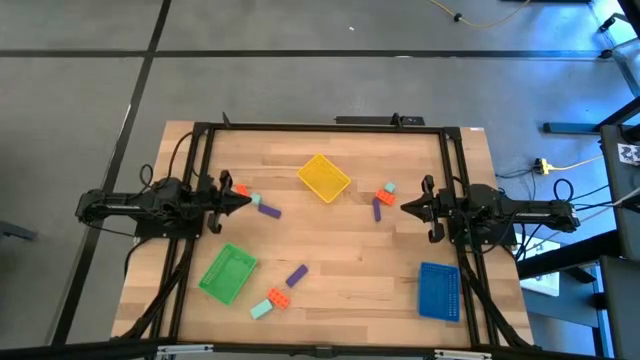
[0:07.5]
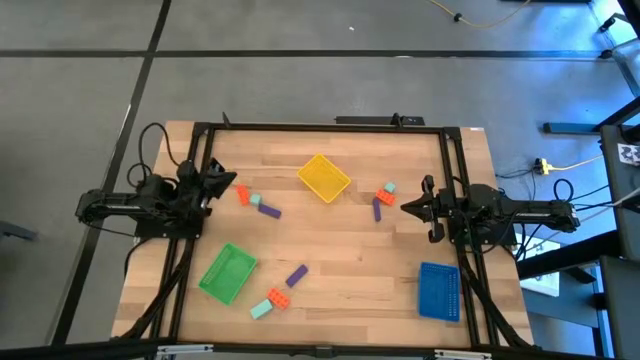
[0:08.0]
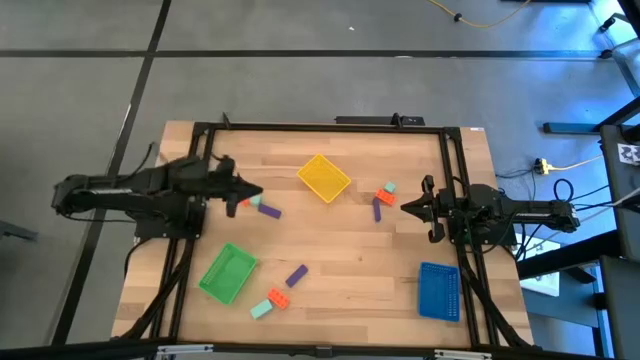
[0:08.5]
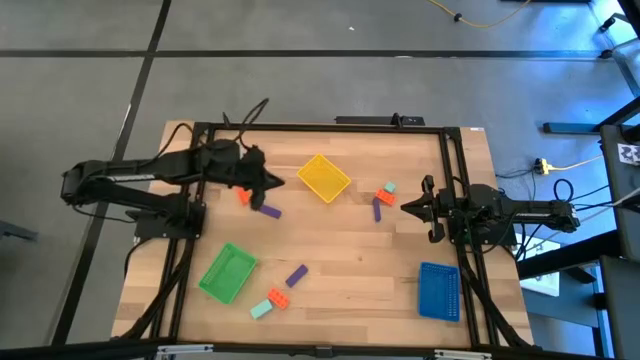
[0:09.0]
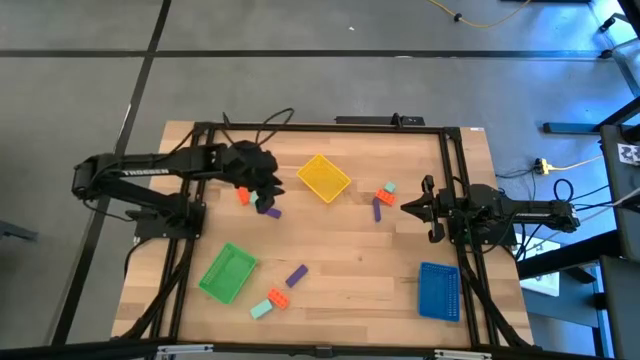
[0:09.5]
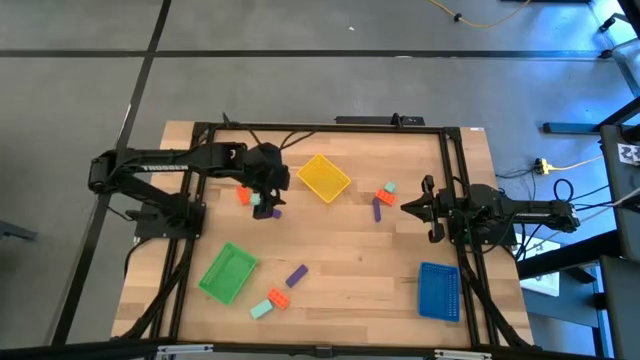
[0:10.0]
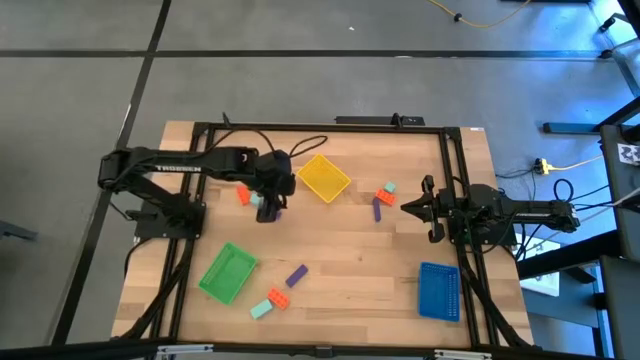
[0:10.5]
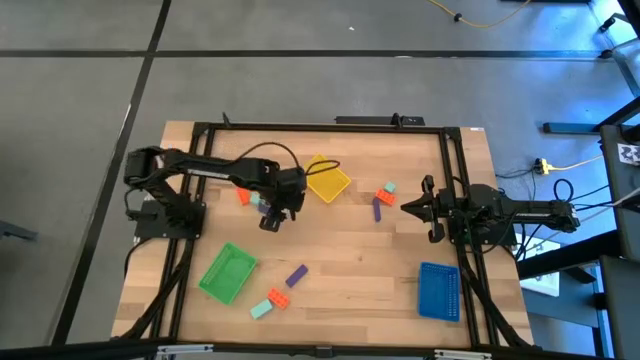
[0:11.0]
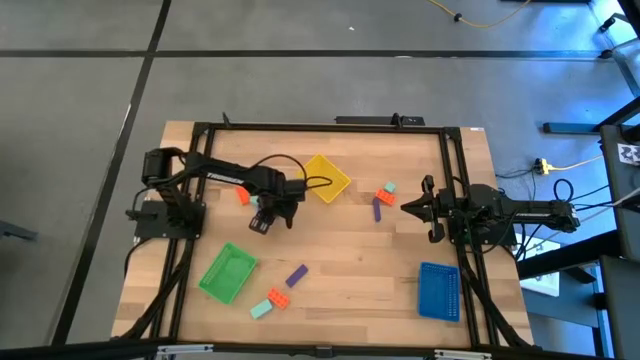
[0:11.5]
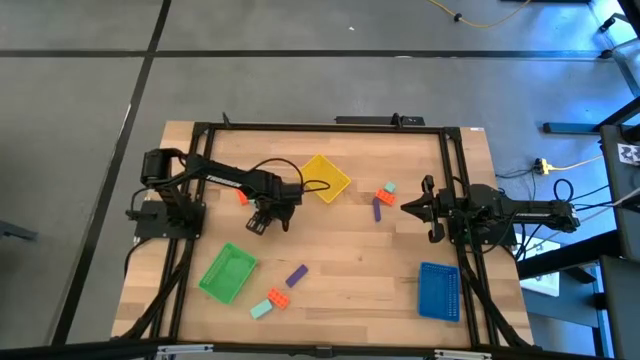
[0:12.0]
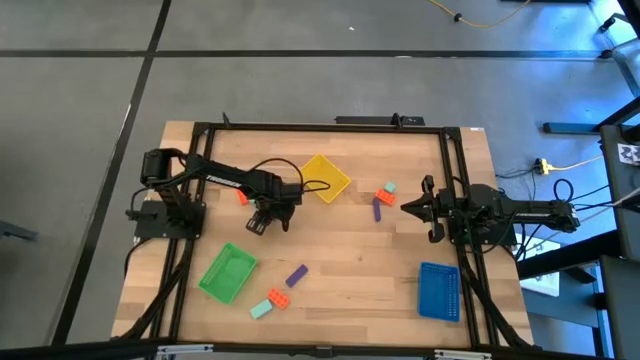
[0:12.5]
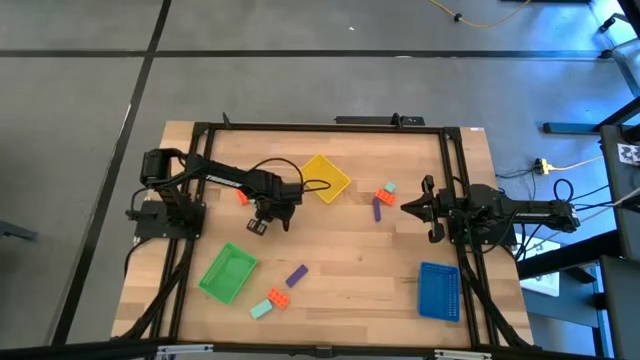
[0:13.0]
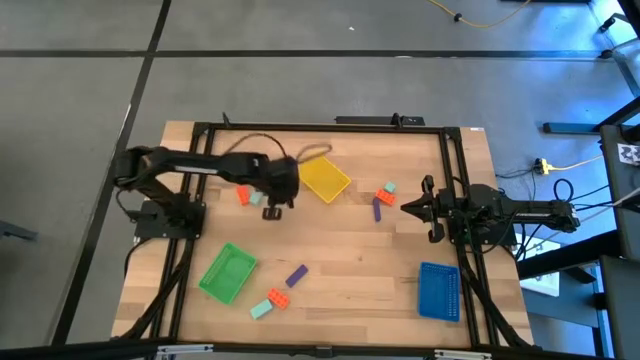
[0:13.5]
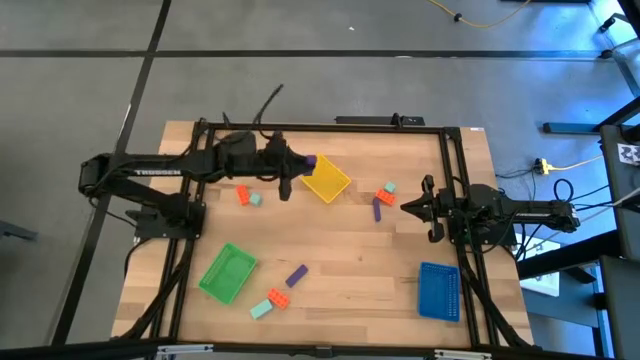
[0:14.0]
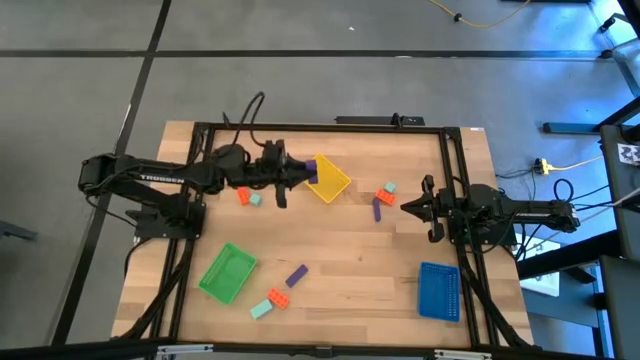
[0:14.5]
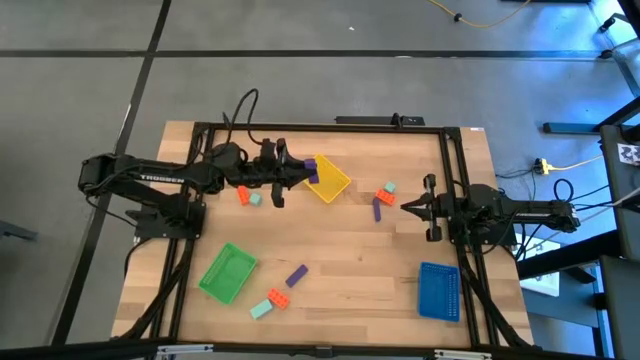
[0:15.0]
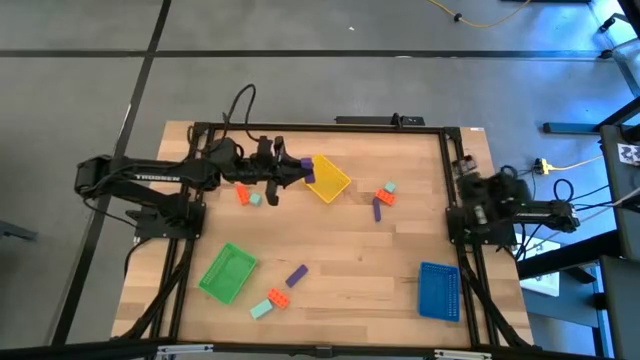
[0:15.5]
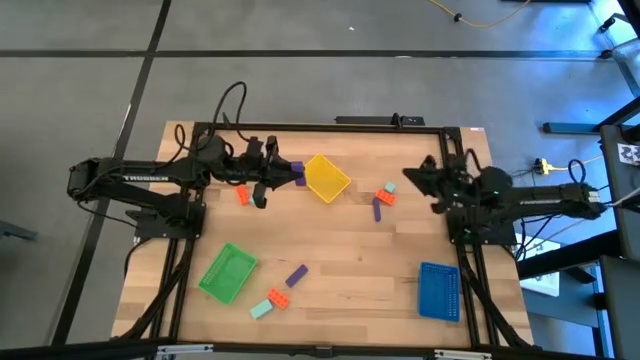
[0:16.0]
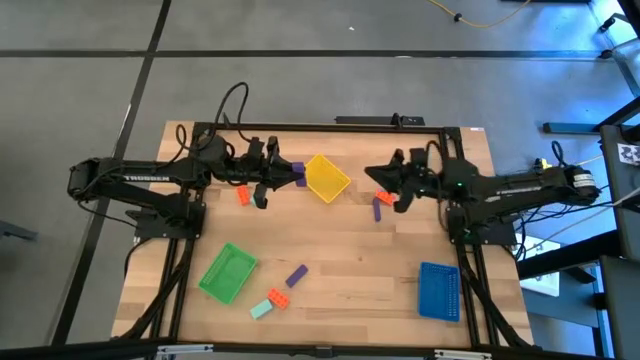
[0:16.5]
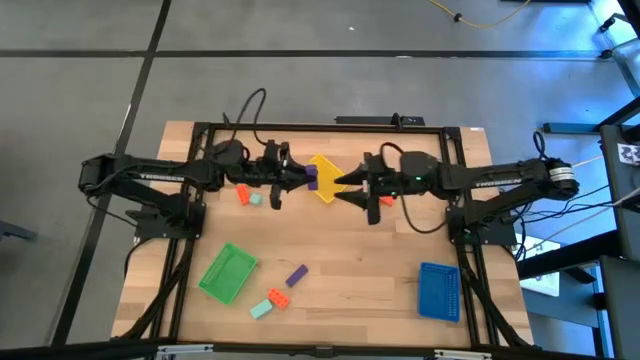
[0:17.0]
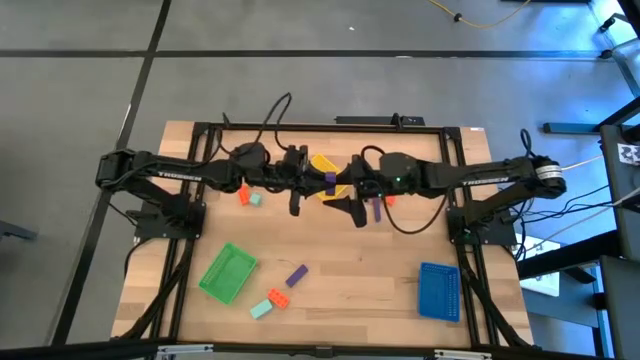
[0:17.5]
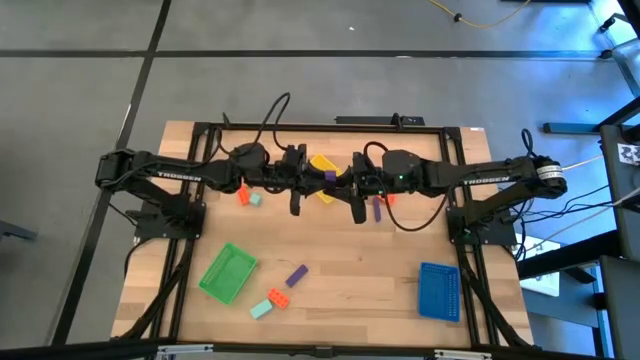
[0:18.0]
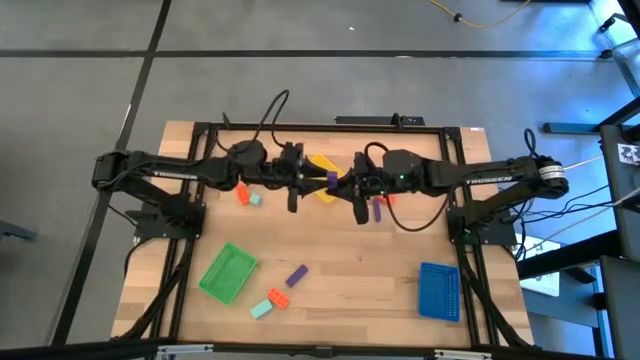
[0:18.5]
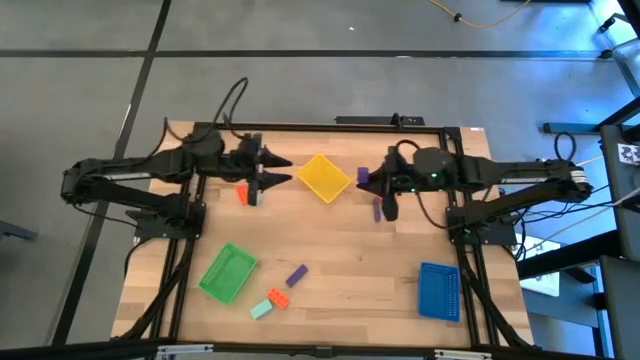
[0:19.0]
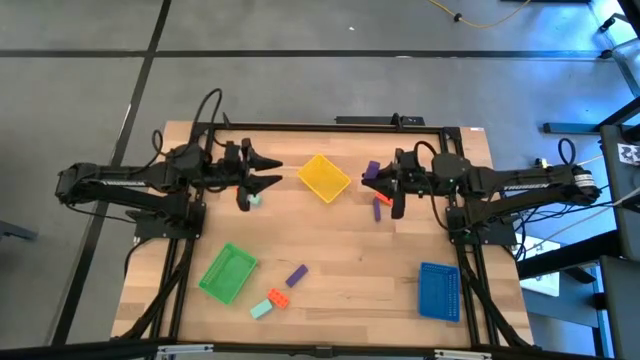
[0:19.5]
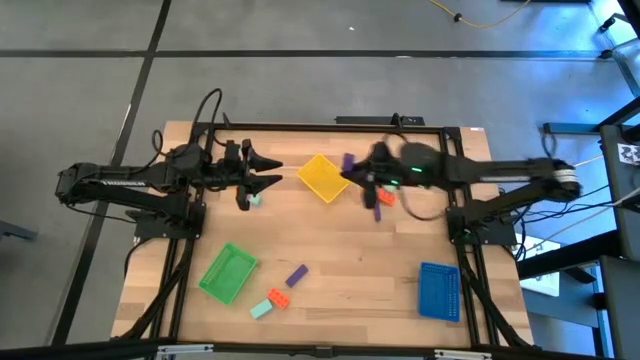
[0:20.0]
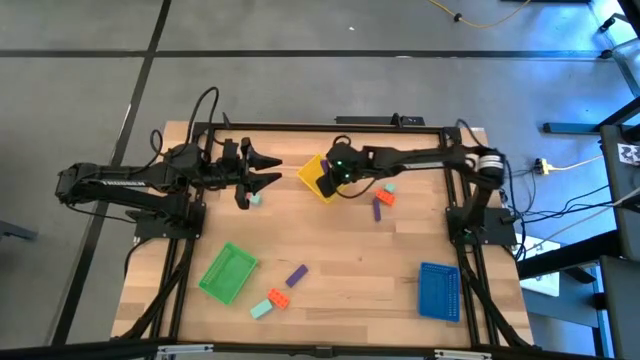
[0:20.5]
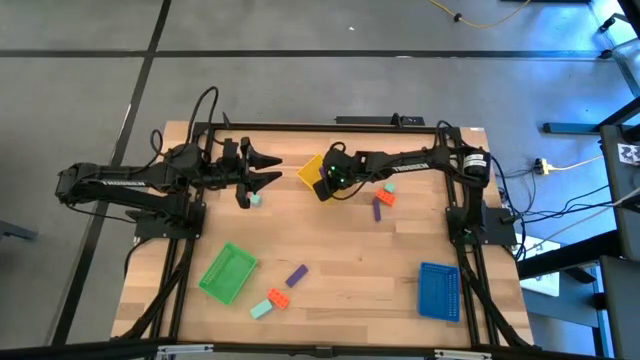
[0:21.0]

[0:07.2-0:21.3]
Task: Sort & place blocks by color
Put the top left violet block into the yellow bin

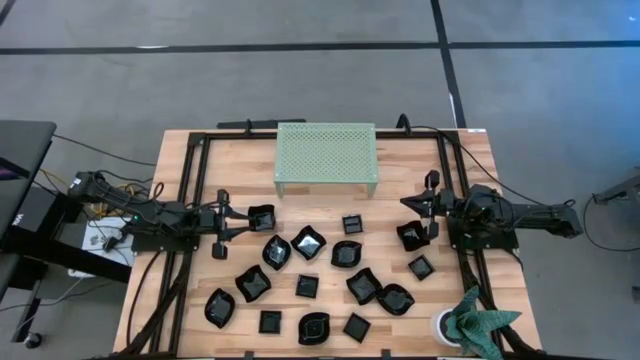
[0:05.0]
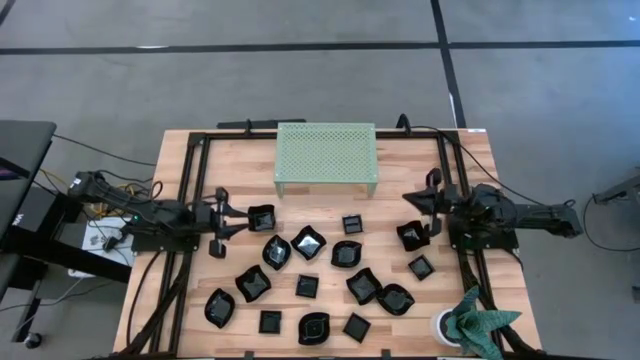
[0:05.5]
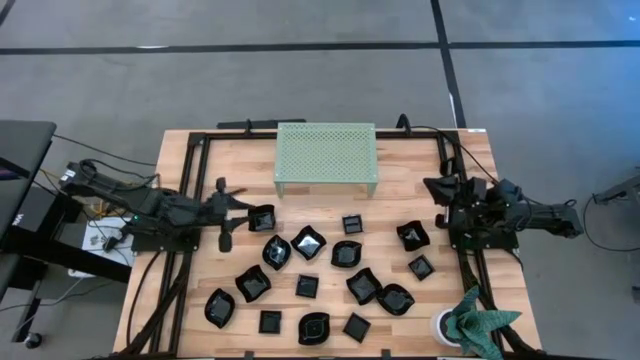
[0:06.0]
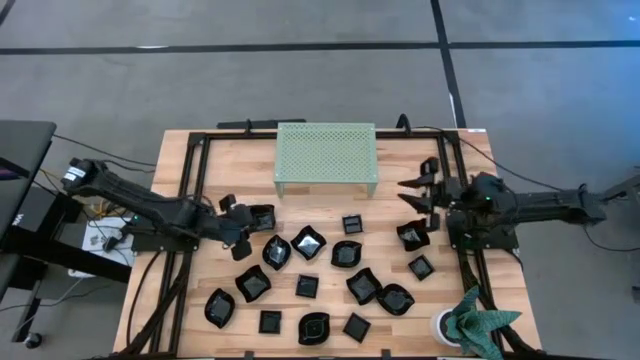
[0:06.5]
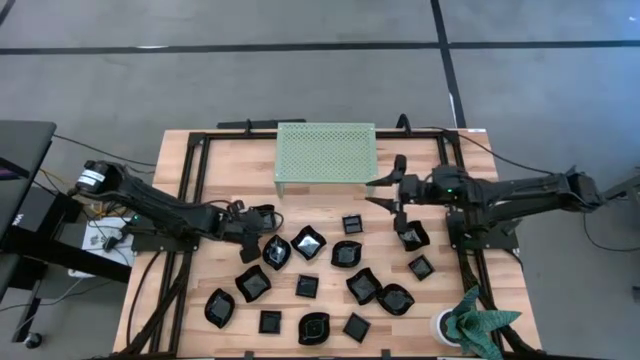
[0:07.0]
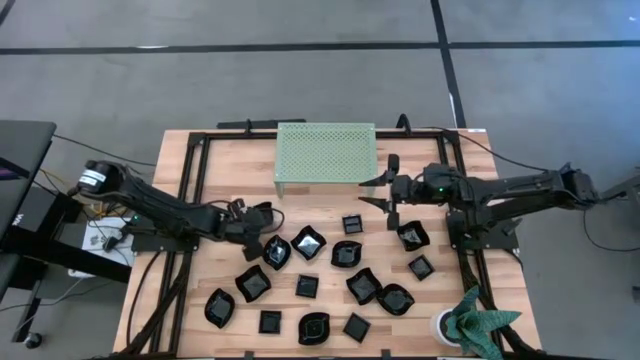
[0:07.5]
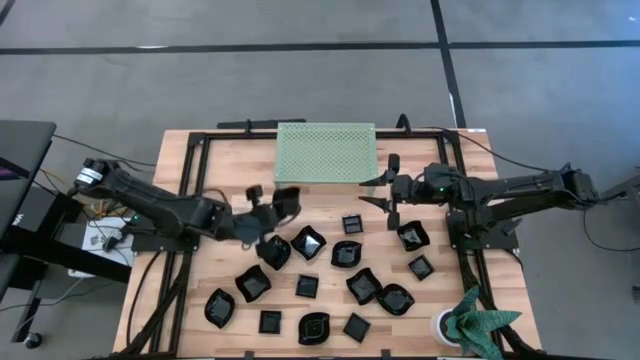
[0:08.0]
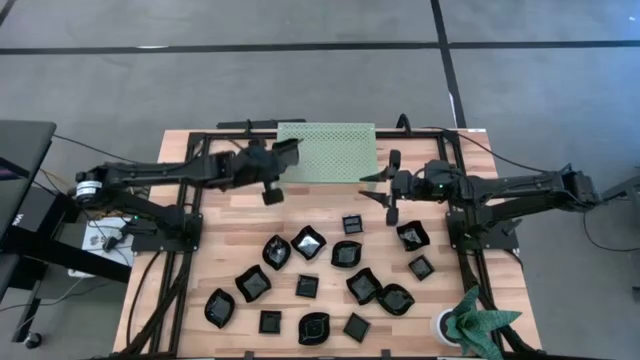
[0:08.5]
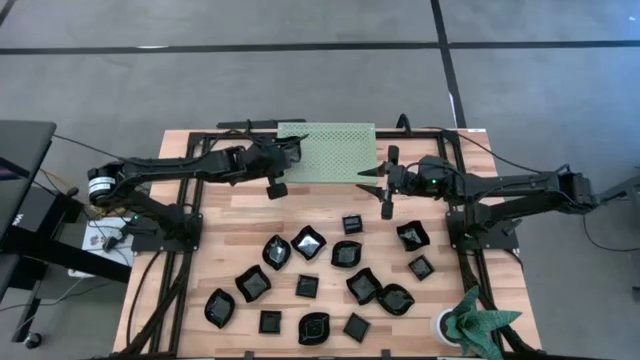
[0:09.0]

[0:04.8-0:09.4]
Task: Pick & Place Mini shaped plates
Put the distorted square plate on the shelf

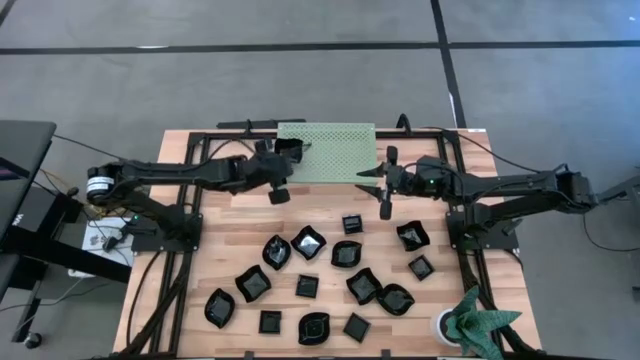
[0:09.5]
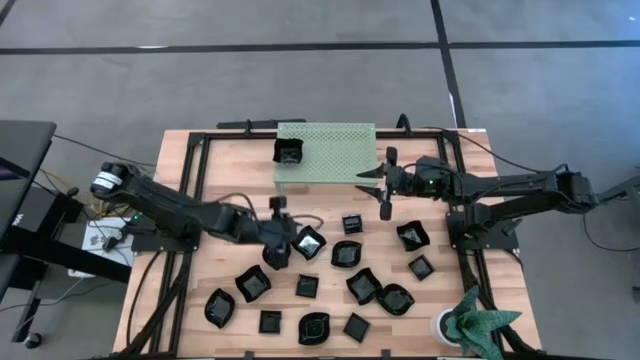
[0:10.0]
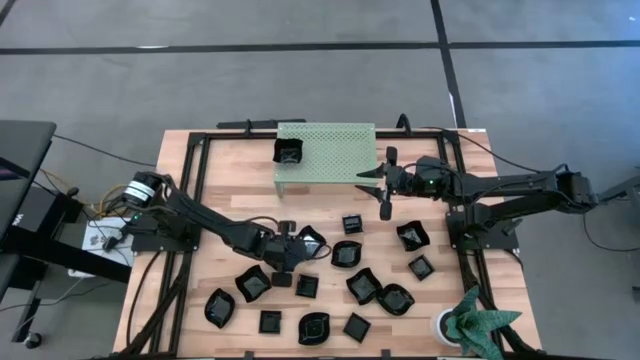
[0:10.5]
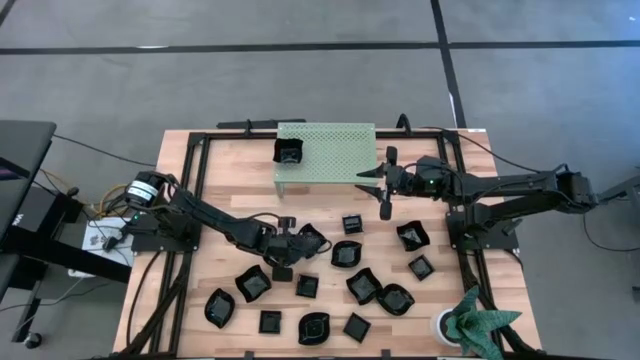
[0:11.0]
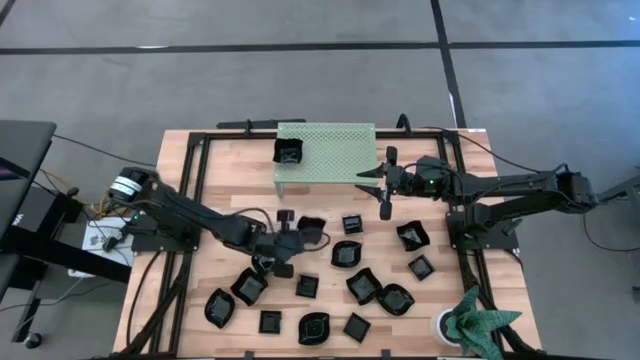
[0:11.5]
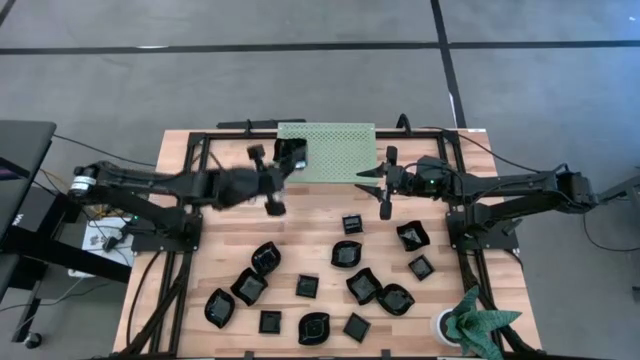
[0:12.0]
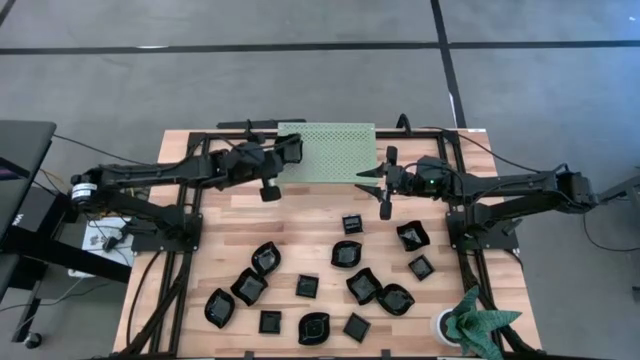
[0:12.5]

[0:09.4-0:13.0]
Stack the distorted square plate on the distorted square plate on the shelf
